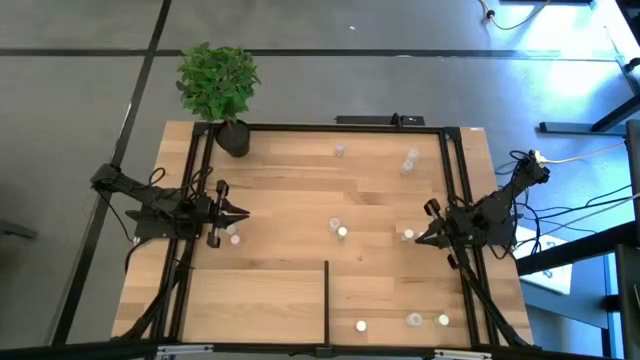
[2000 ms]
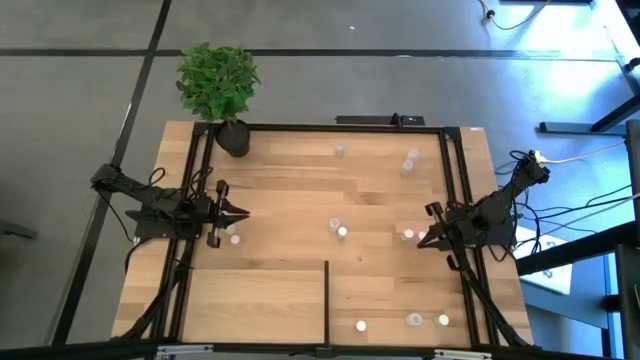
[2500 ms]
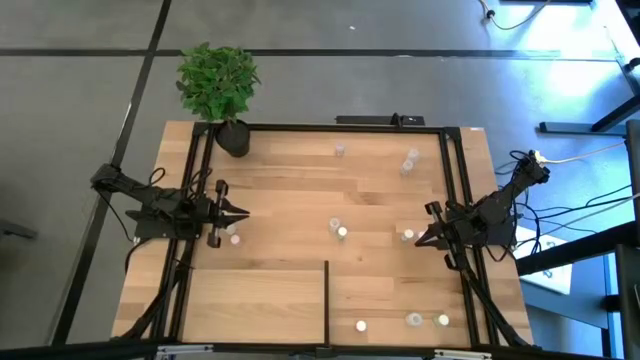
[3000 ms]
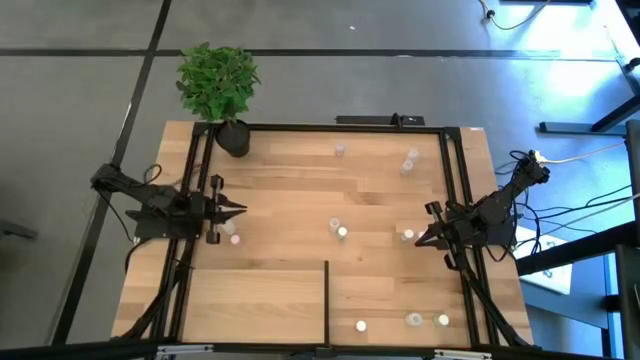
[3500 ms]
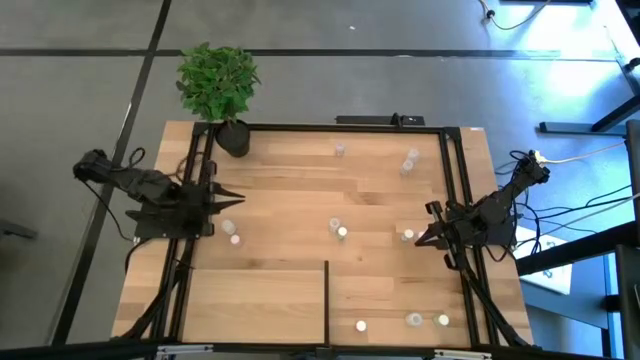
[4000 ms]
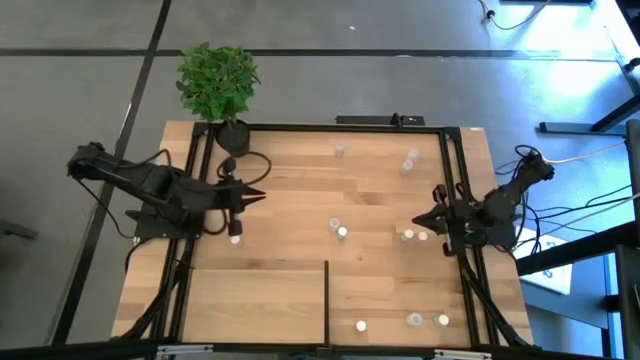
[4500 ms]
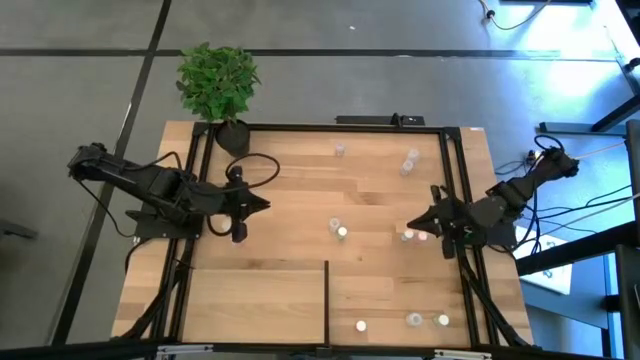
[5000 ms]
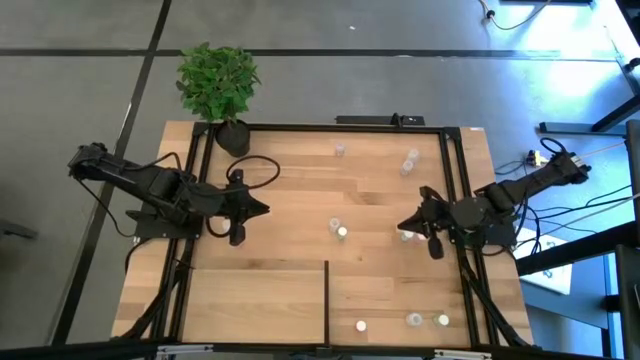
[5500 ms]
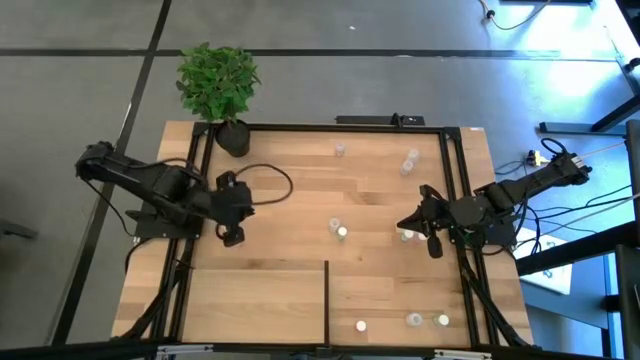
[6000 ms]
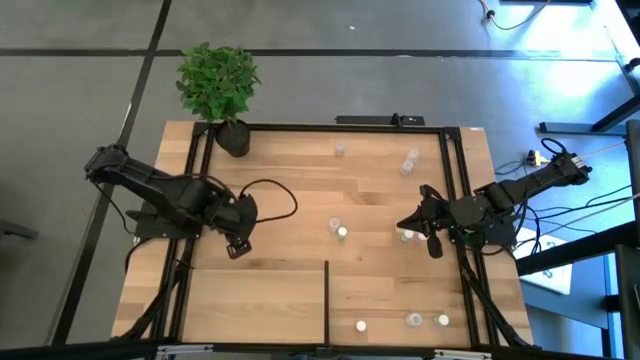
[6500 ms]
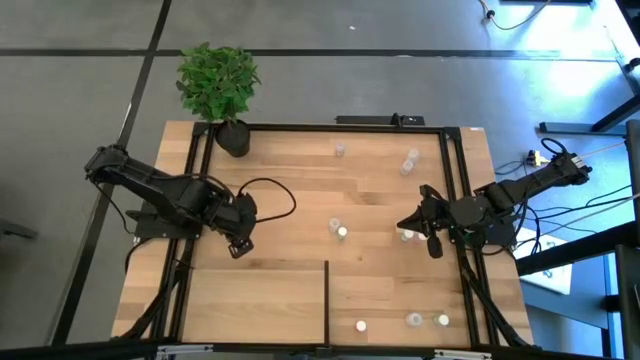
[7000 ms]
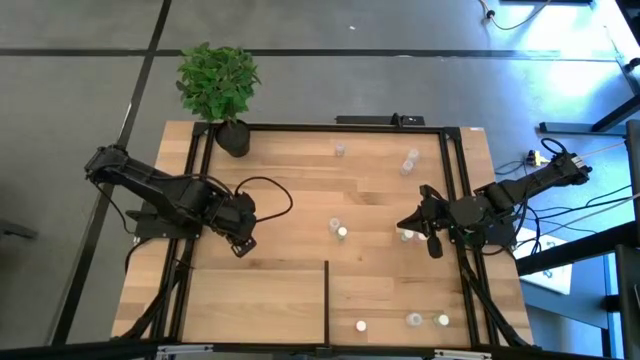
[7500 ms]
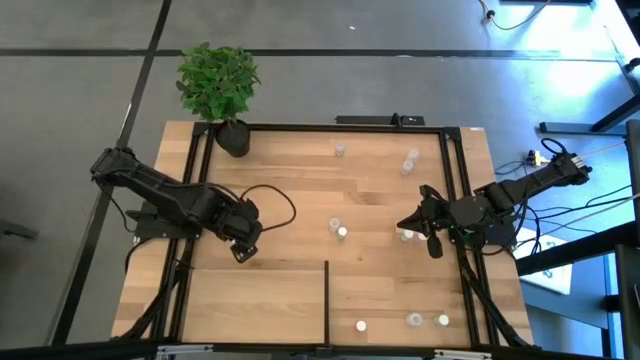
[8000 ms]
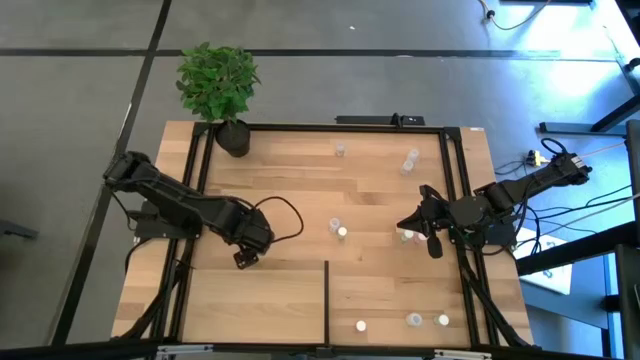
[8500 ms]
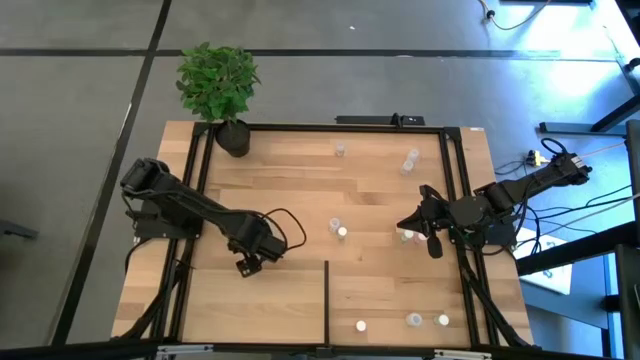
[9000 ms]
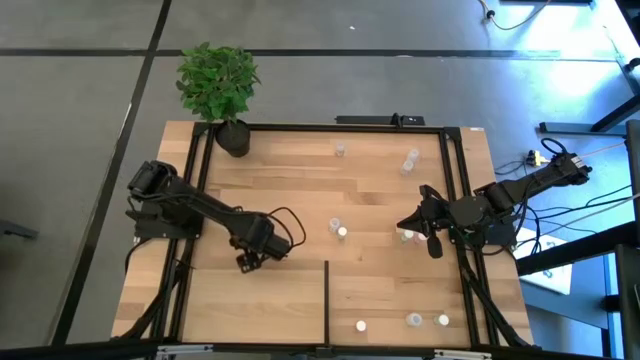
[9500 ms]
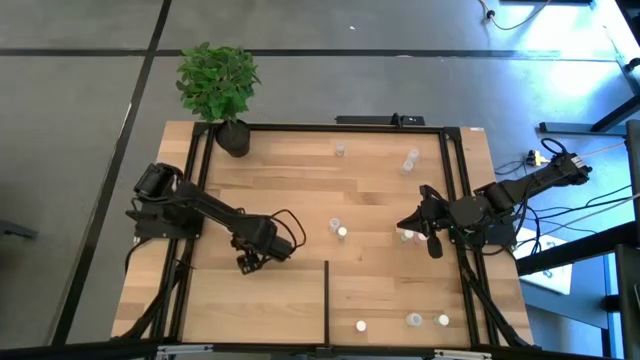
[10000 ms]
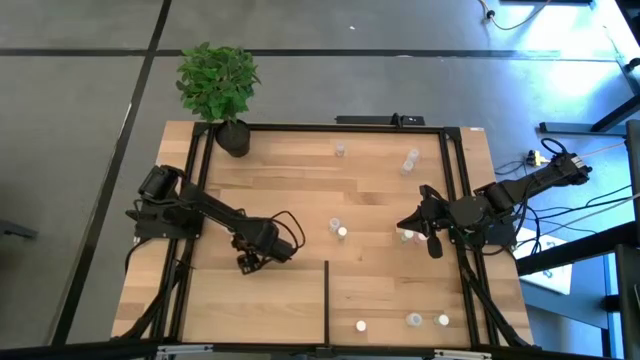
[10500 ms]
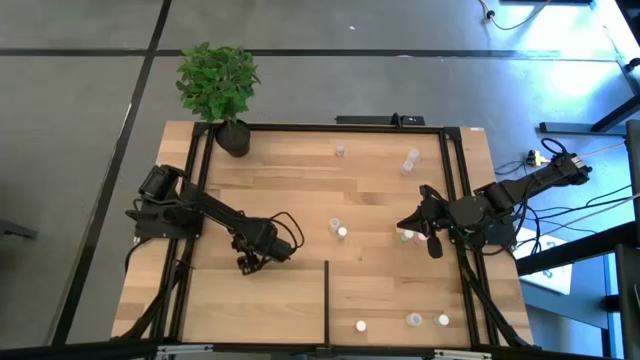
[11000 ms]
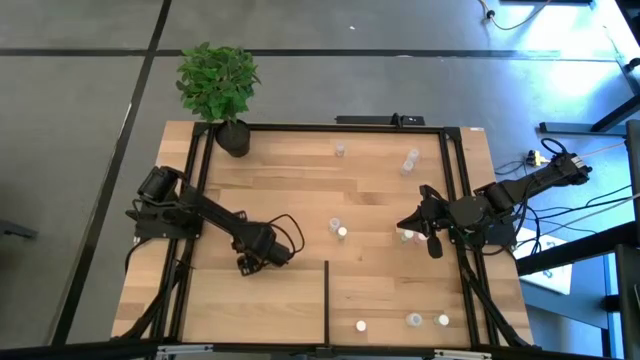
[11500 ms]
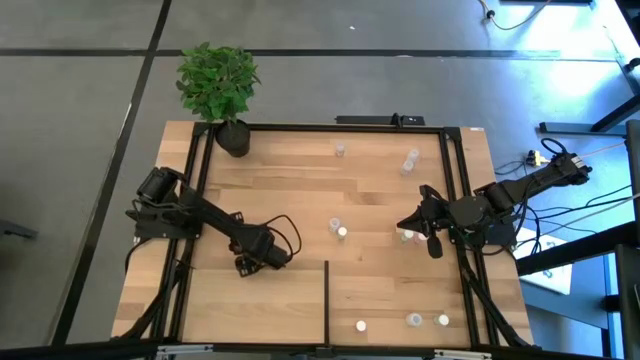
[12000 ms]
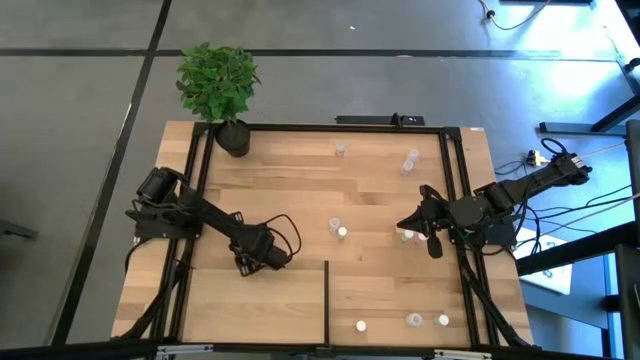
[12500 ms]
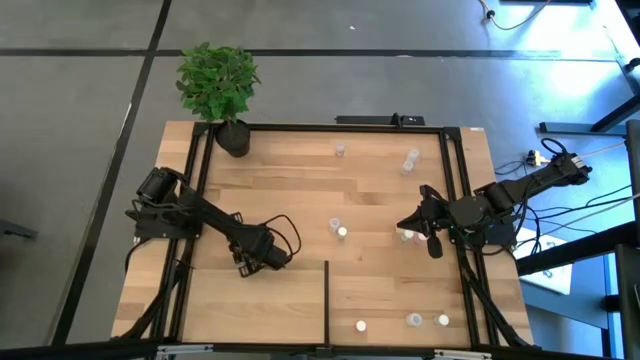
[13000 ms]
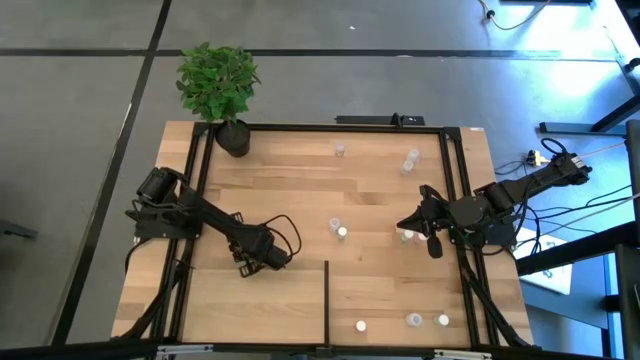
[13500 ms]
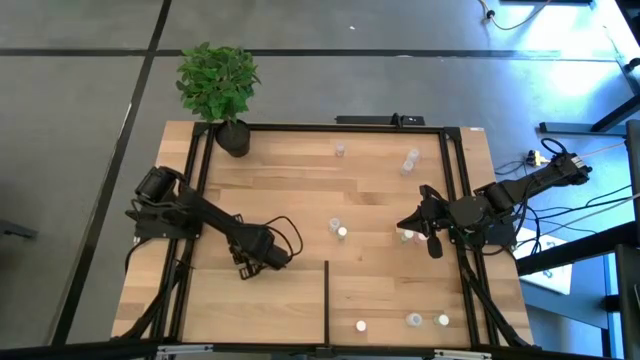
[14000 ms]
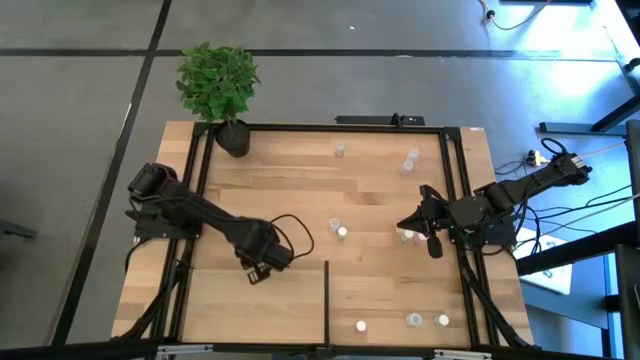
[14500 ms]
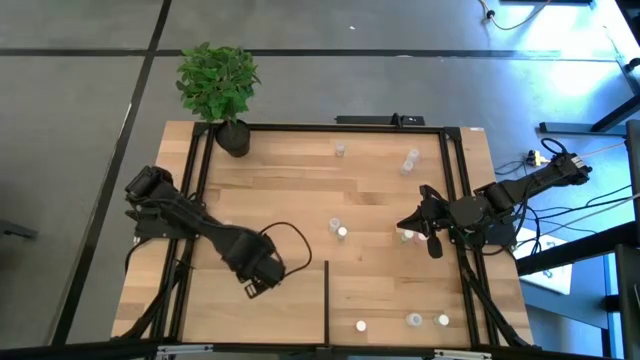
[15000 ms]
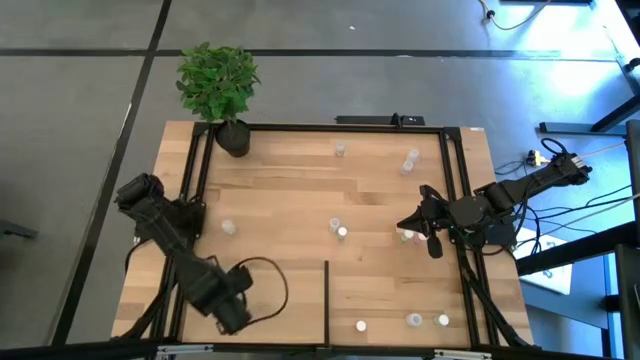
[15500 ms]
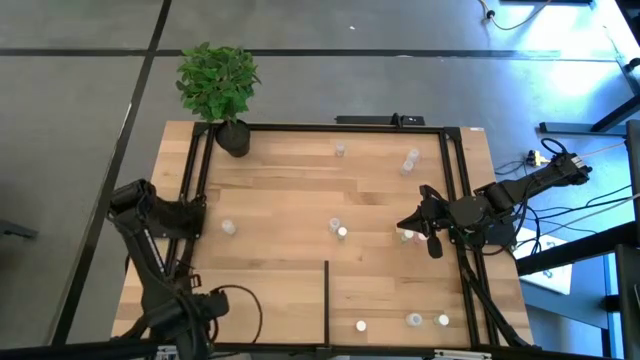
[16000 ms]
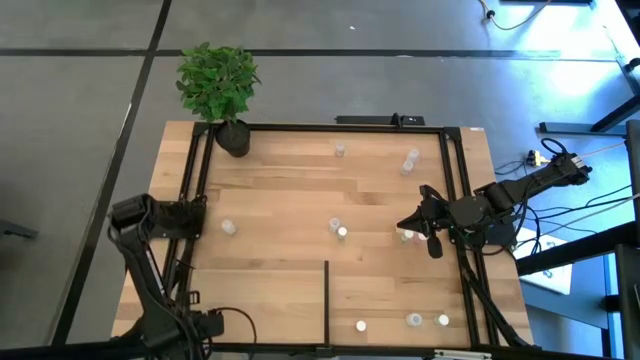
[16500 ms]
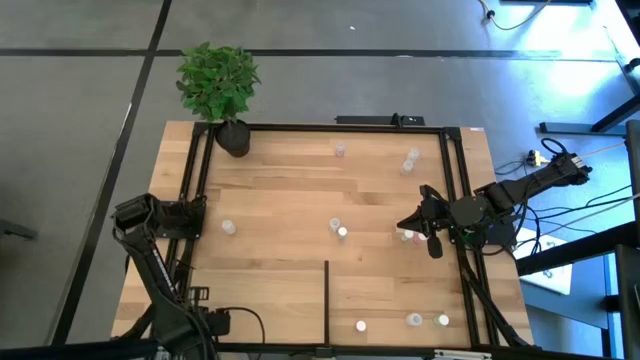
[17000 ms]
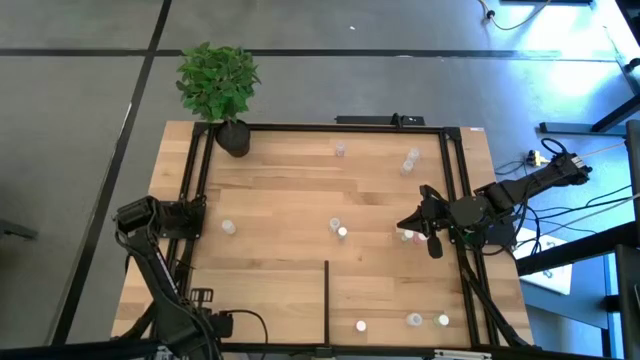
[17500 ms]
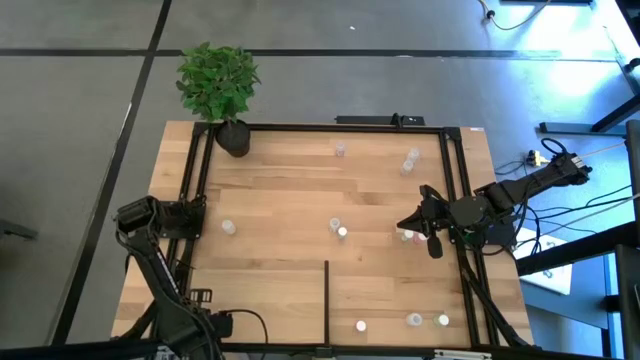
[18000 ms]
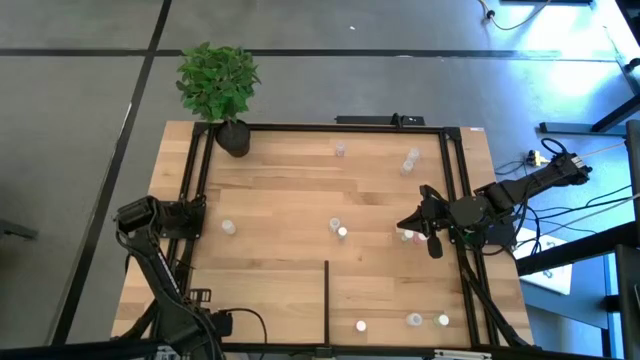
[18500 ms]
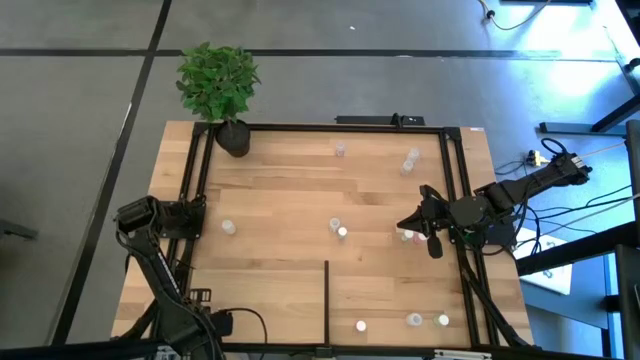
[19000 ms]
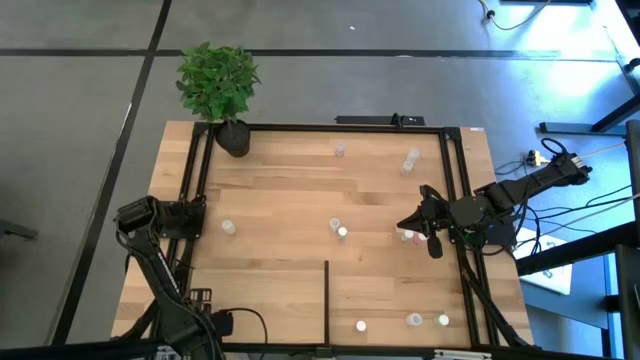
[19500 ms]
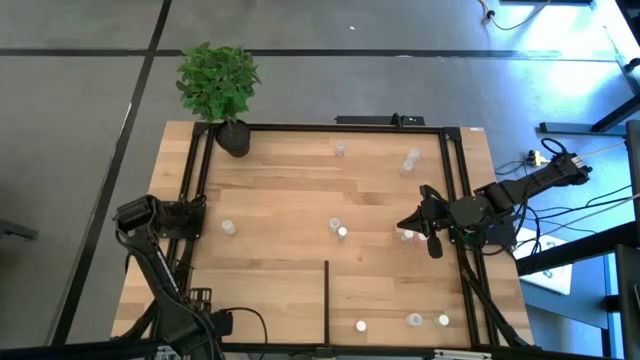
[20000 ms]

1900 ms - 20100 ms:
Task: Pick and place medicine bottles onto shelf by color
Put the top left pink pill bottle on the shelf
